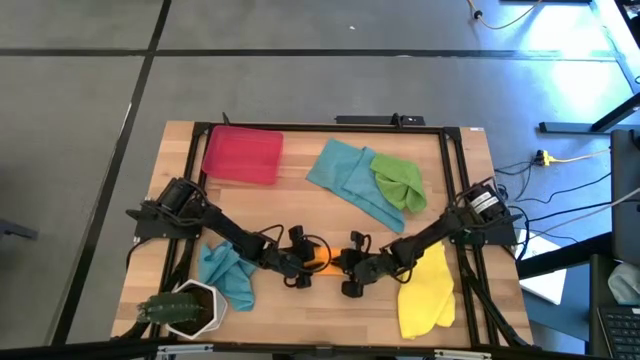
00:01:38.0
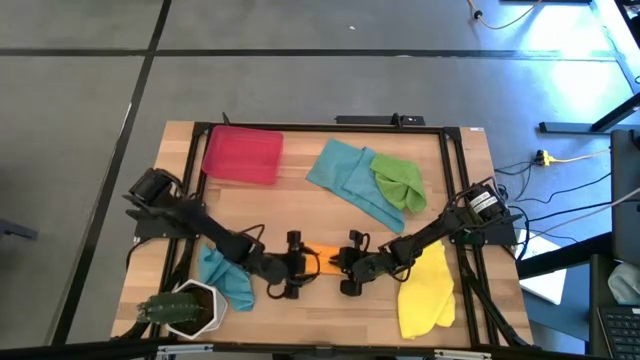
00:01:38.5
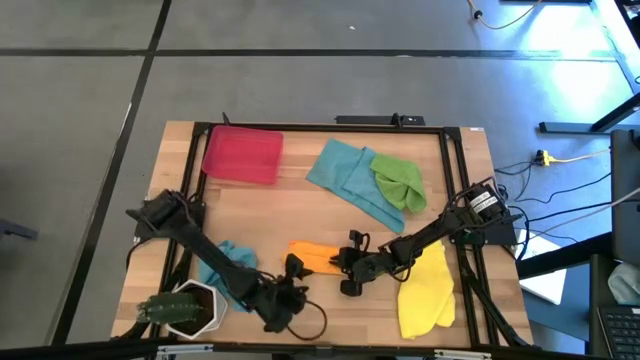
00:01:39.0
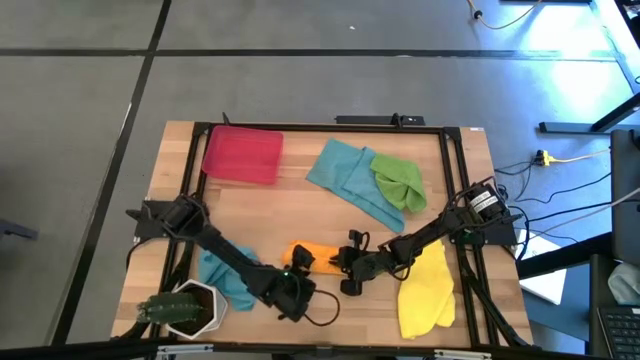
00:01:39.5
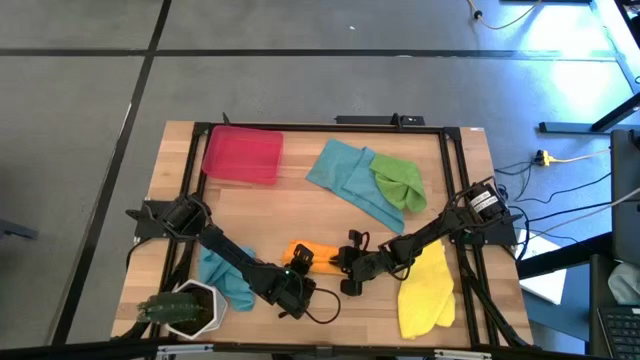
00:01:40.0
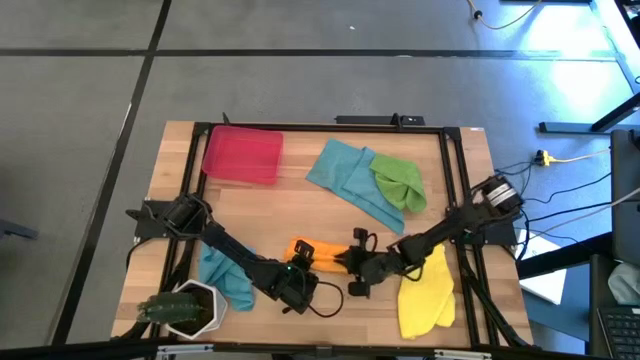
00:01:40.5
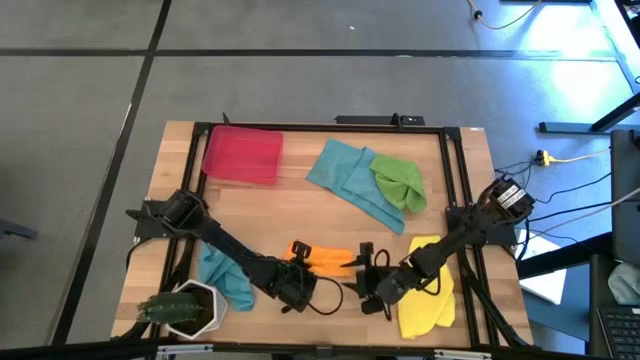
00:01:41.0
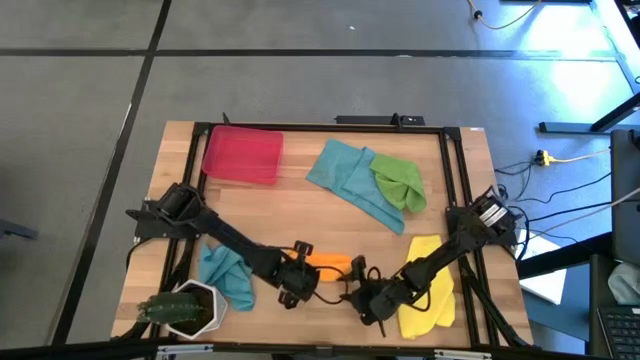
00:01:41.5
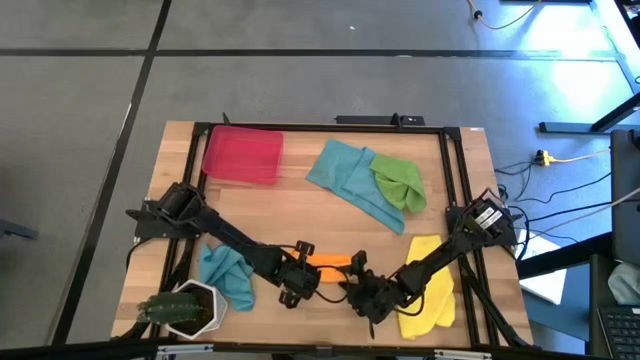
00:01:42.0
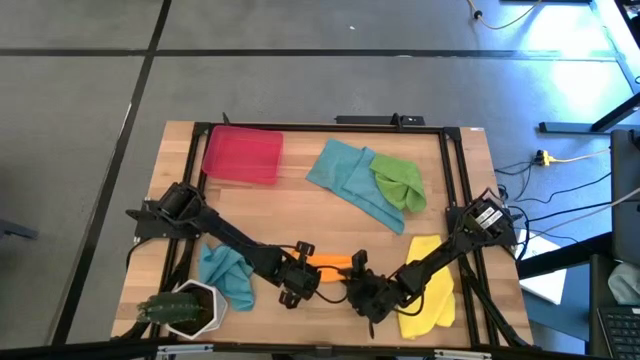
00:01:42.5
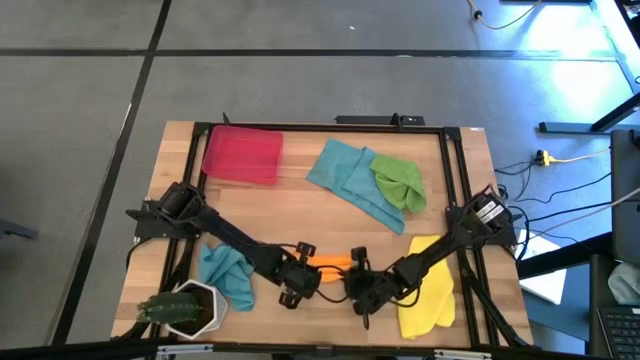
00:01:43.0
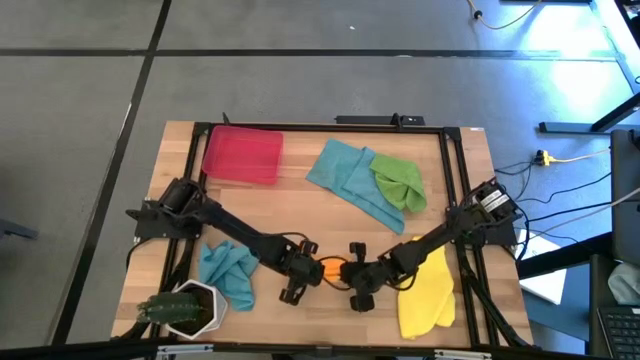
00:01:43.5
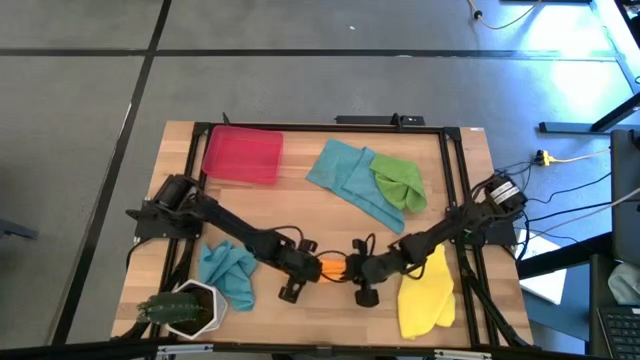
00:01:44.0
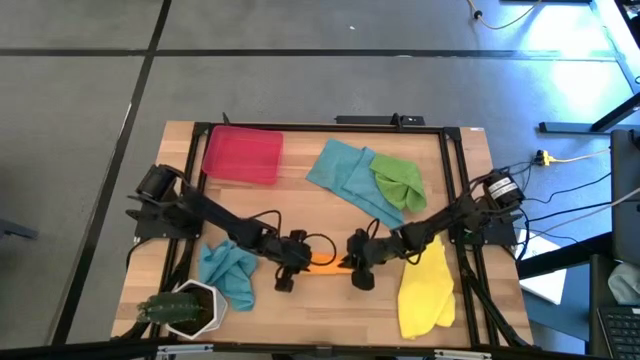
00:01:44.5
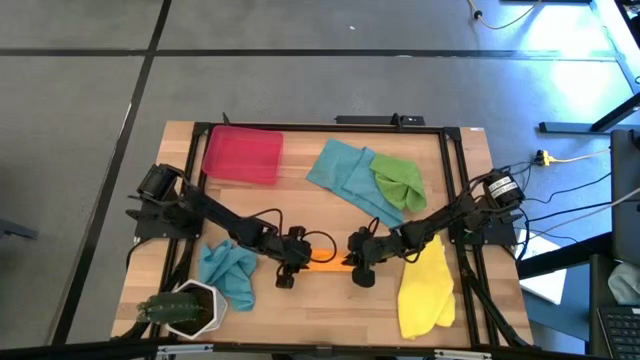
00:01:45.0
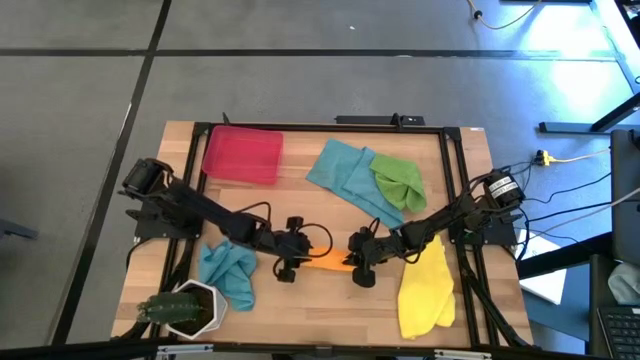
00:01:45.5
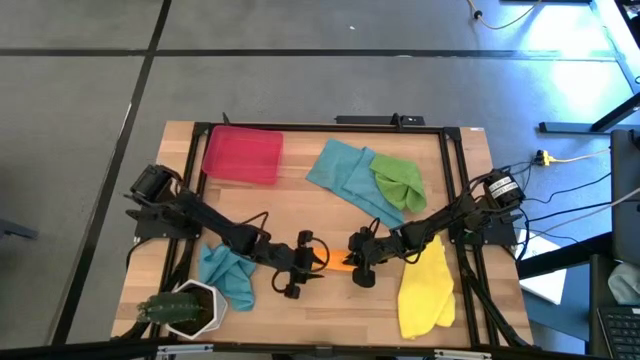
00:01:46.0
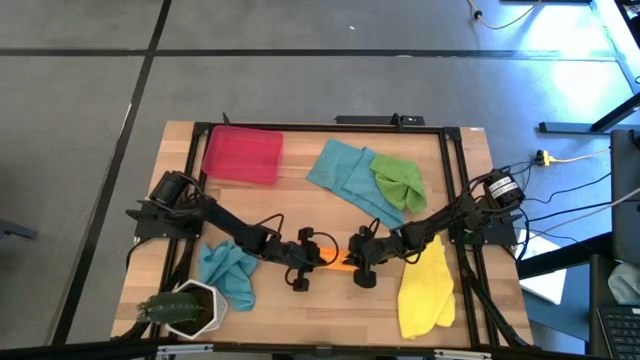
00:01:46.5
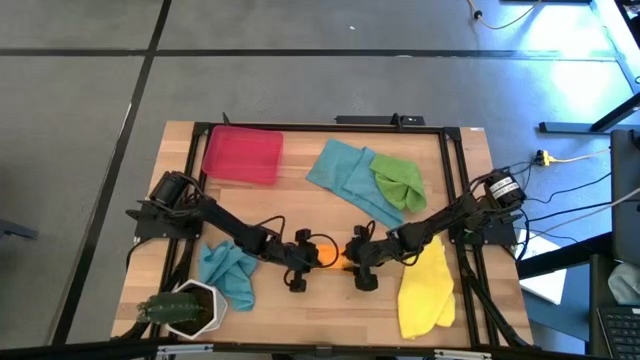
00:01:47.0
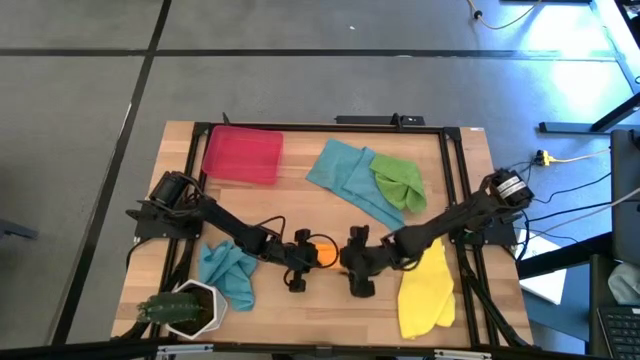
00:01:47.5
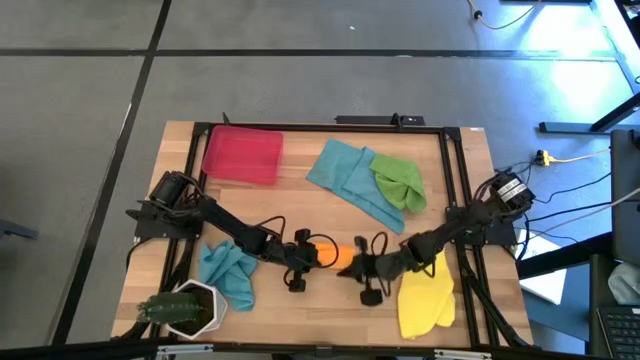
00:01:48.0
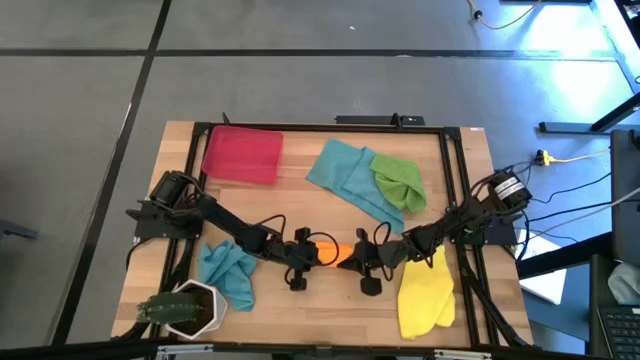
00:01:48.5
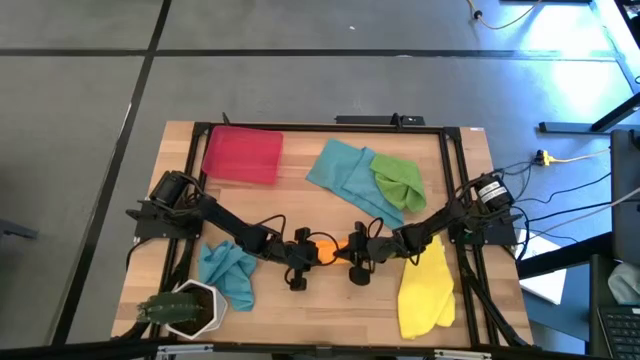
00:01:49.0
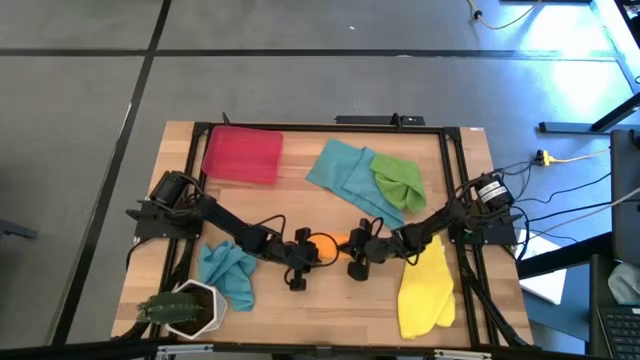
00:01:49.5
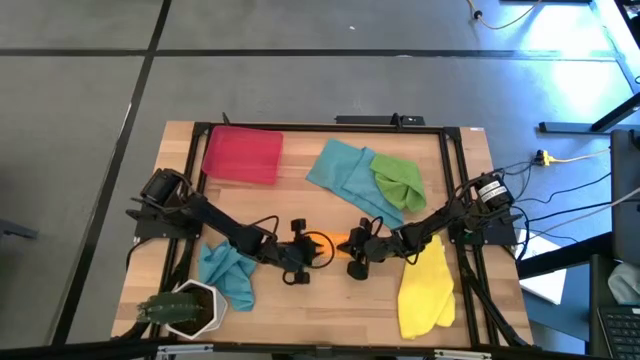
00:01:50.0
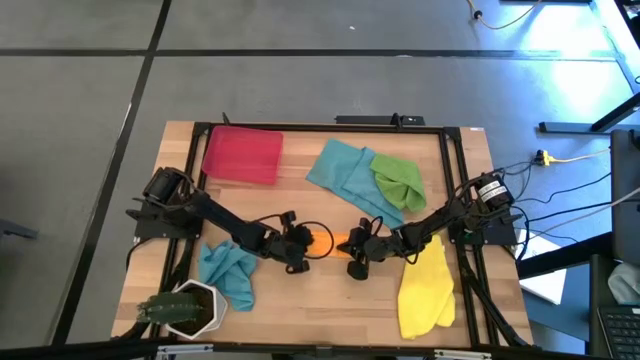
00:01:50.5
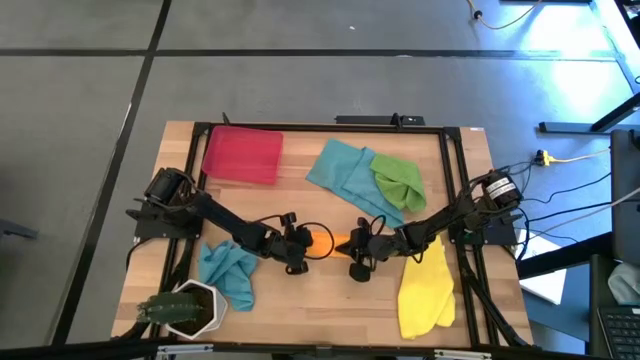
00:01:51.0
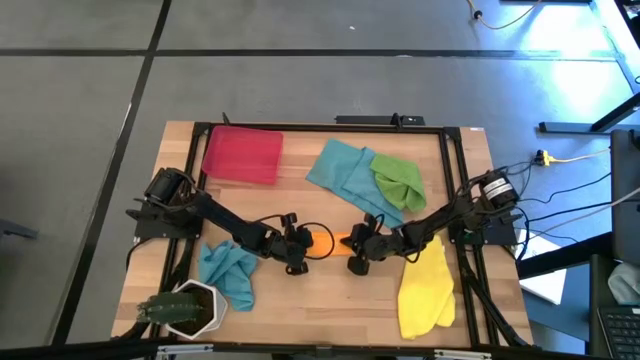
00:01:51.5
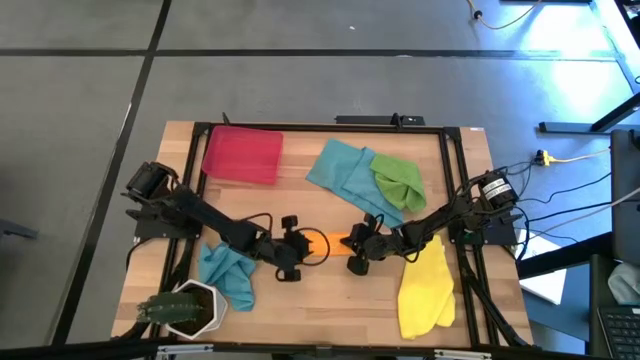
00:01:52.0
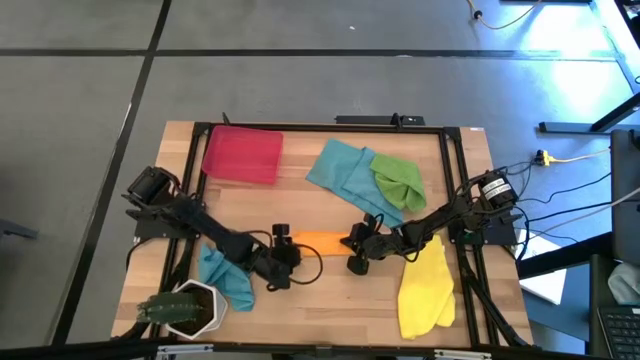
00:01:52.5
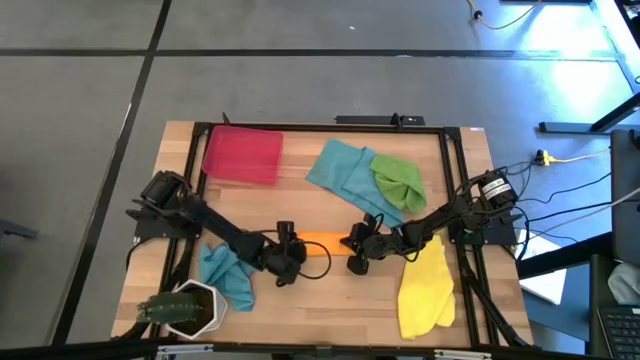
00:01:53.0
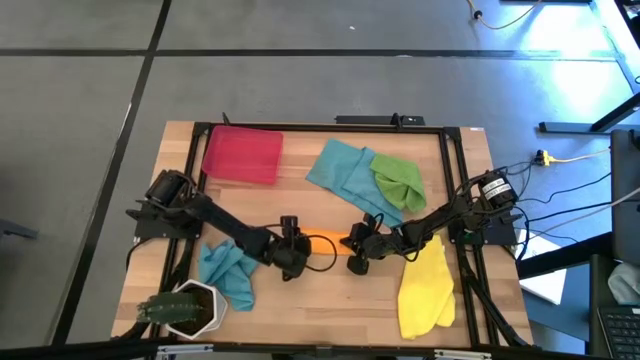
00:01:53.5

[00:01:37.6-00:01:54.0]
Task: Roll microfiber towels into tight, uniform cylinder then place into a basket
Roll the orange microfiber towel

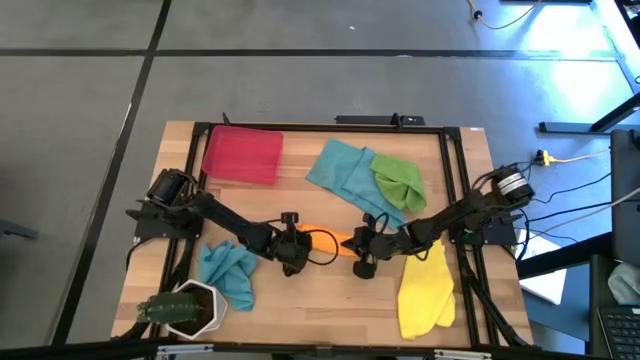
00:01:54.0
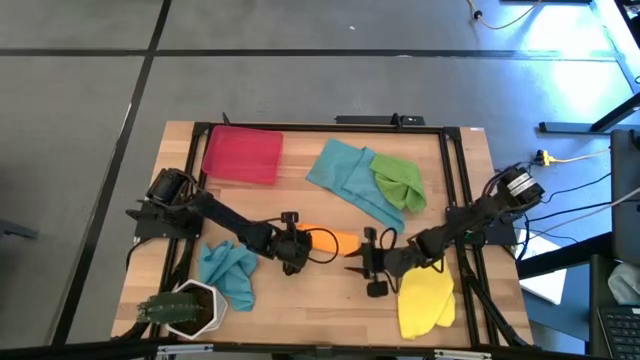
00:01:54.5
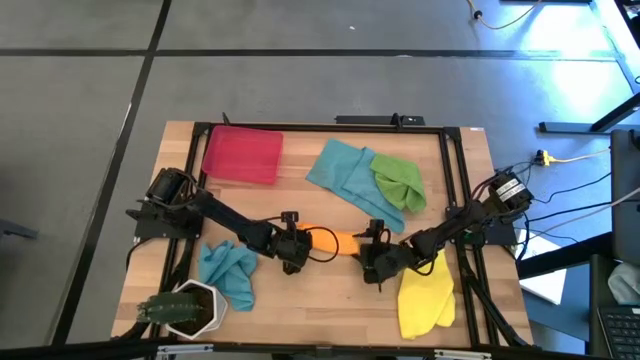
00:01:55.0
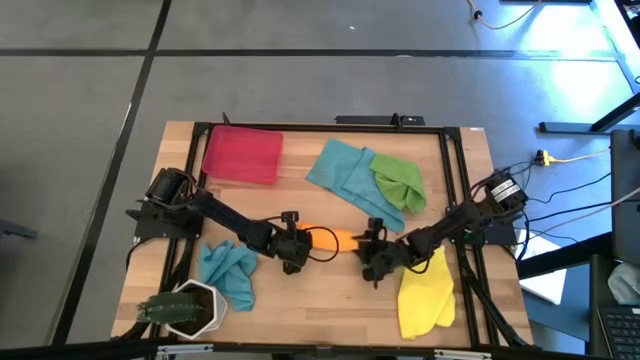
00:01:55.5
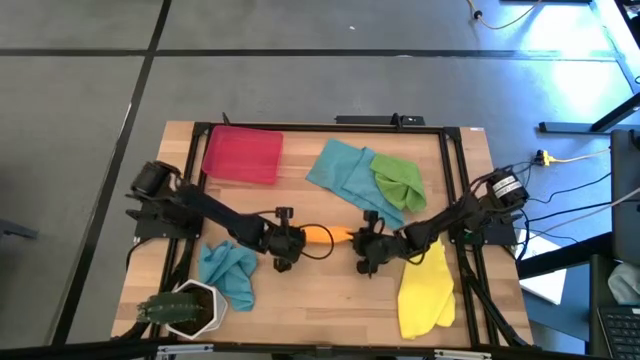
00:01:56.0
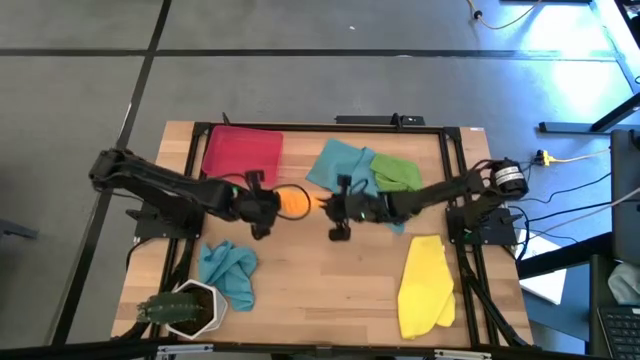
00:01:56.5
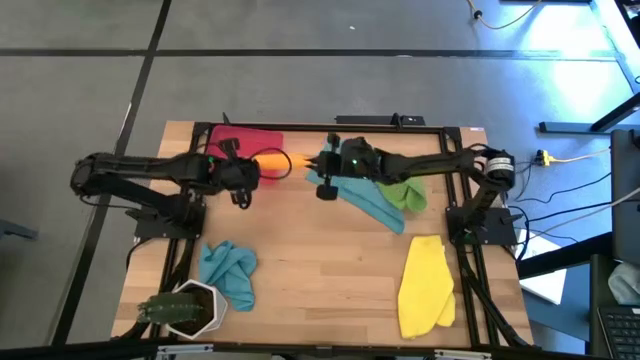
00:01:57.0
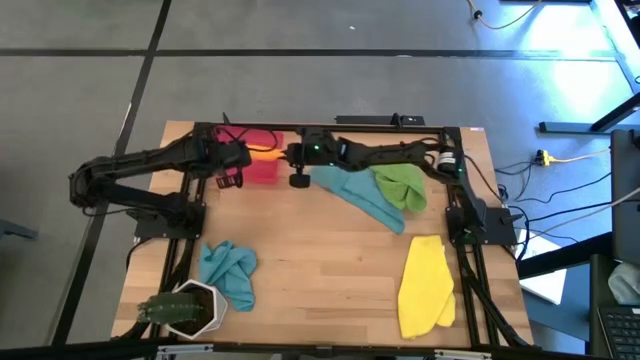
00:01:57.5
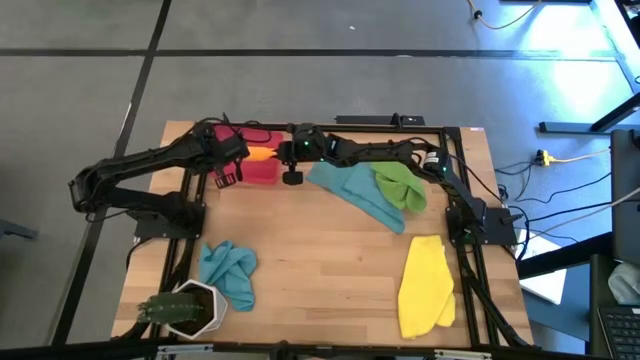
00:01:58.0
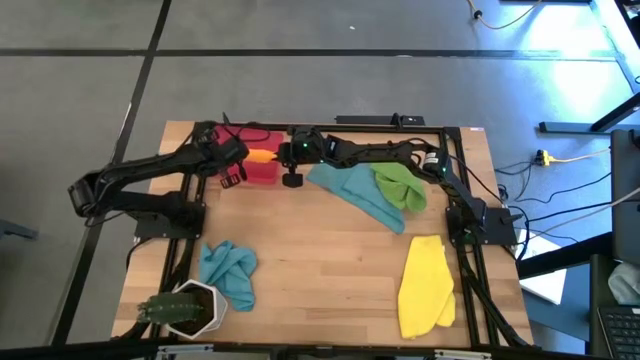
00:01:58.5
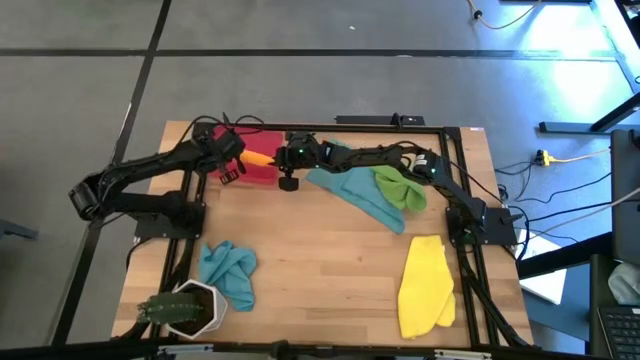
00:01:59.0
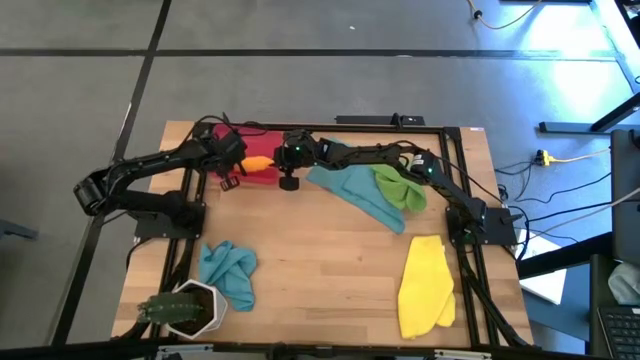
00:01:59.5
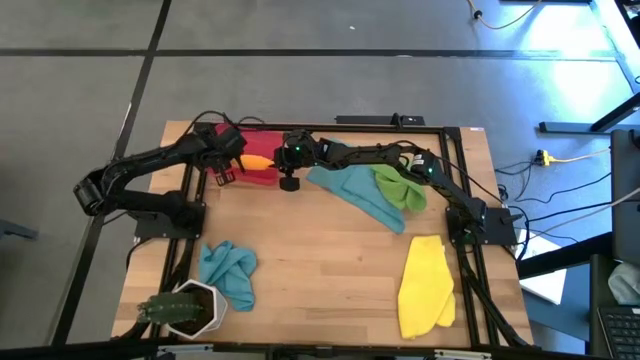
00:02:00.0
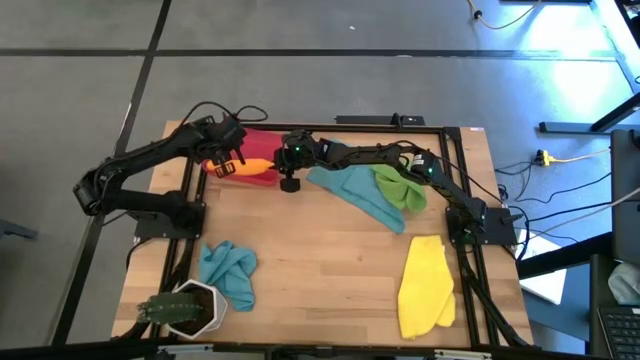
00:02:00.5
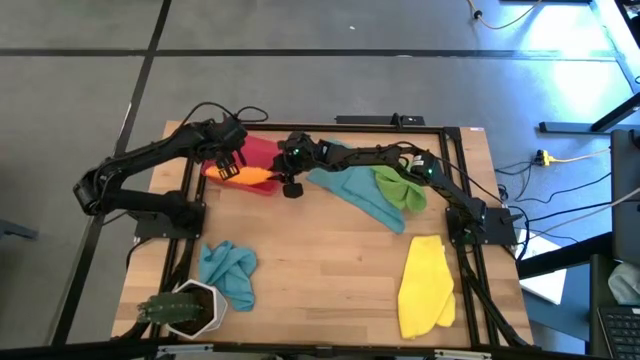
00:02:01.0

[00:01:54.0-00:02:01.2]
Put the rolled orange microfiber towel into the red bin
